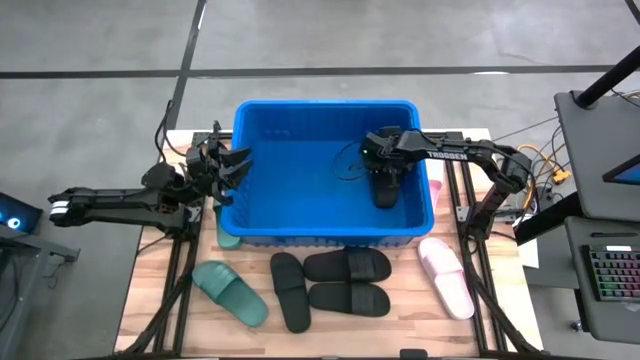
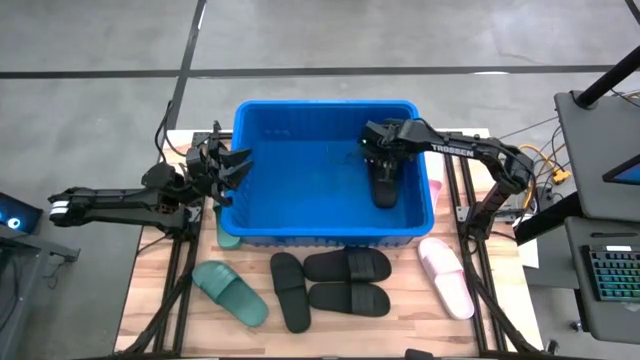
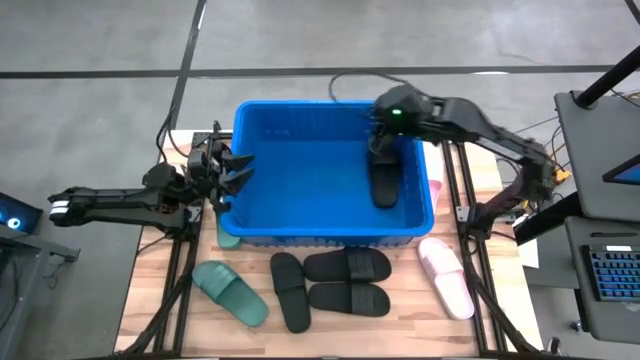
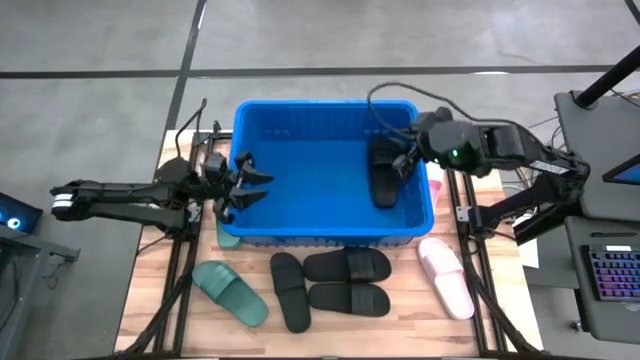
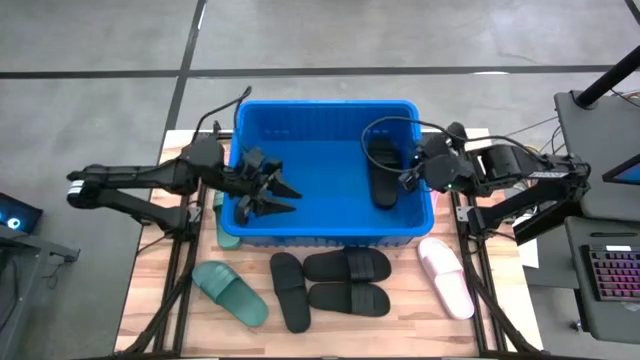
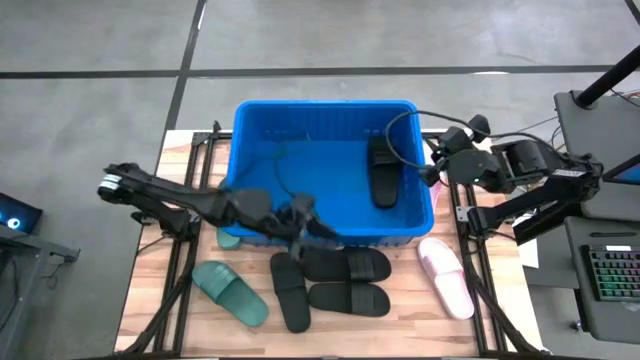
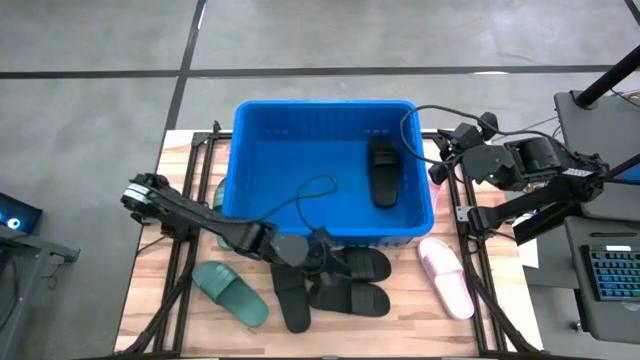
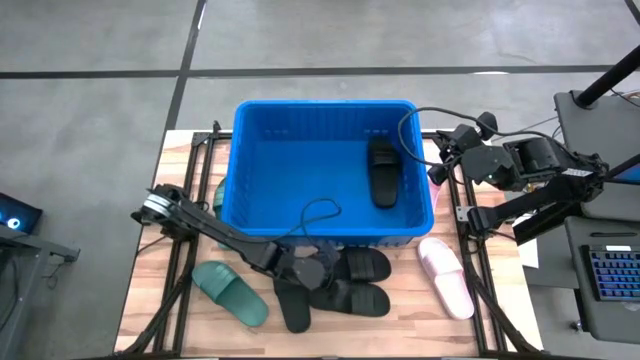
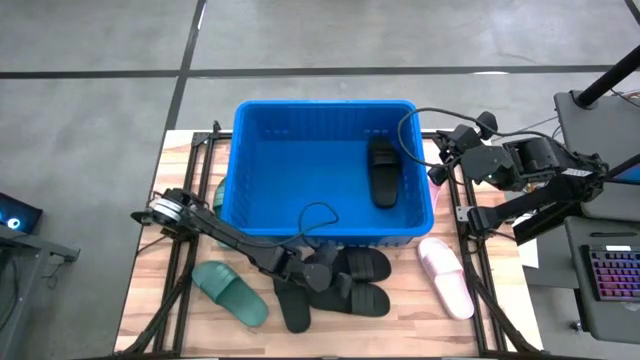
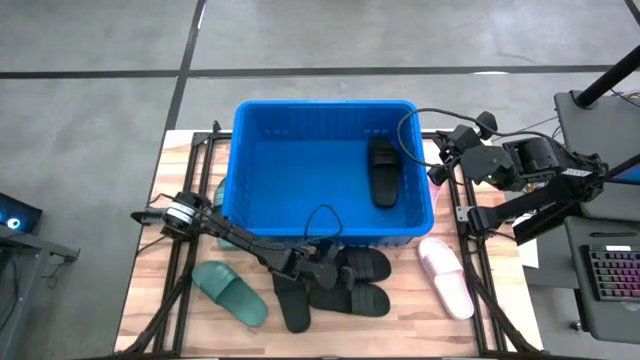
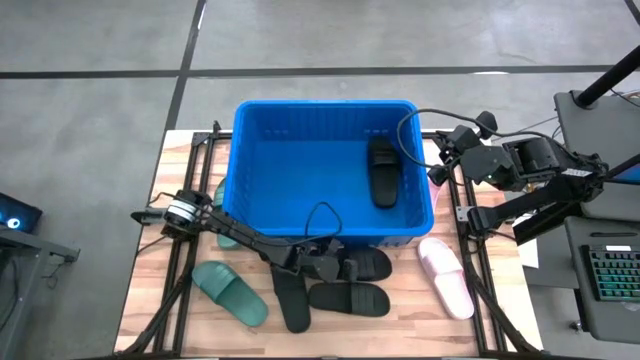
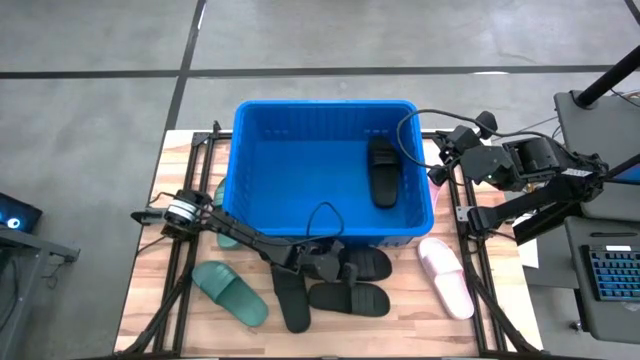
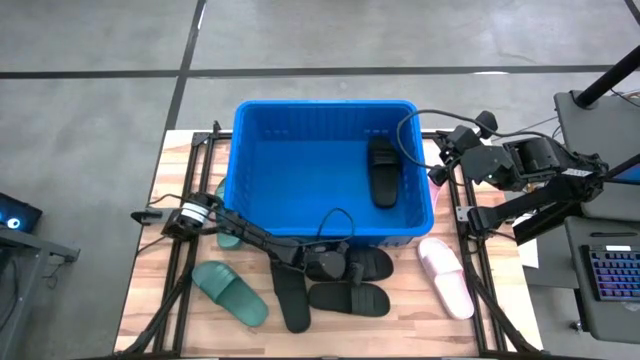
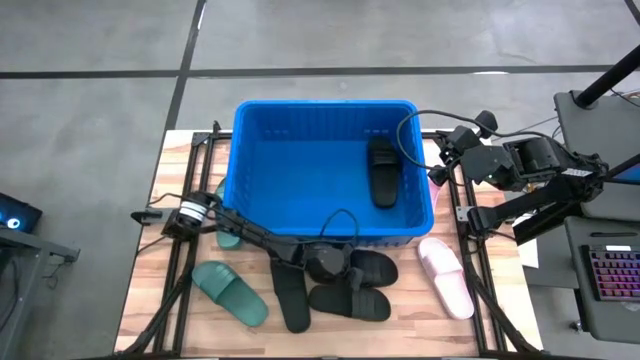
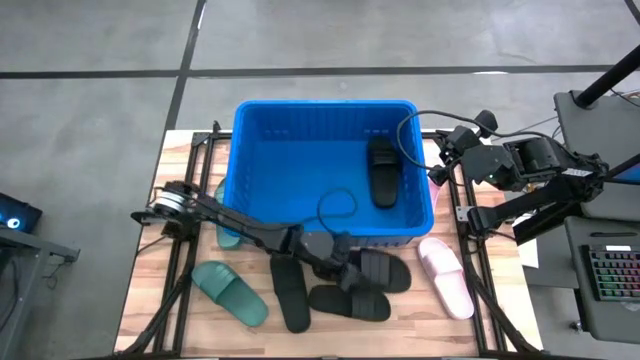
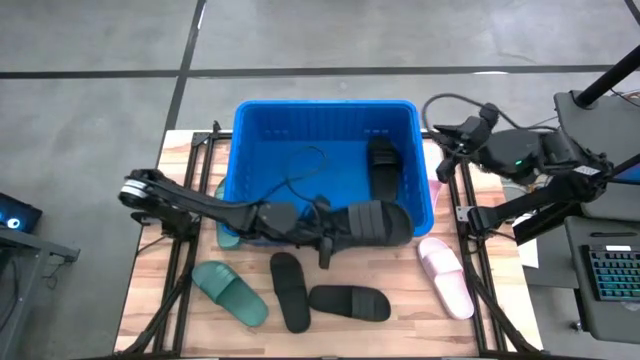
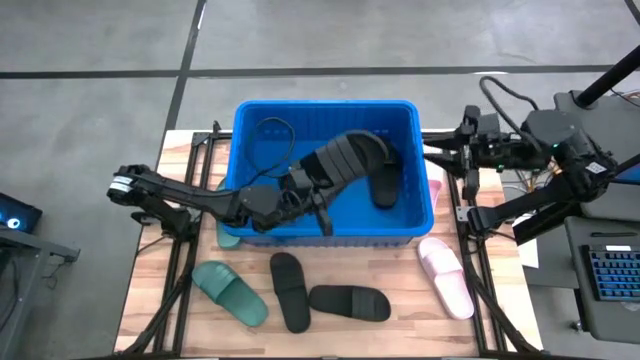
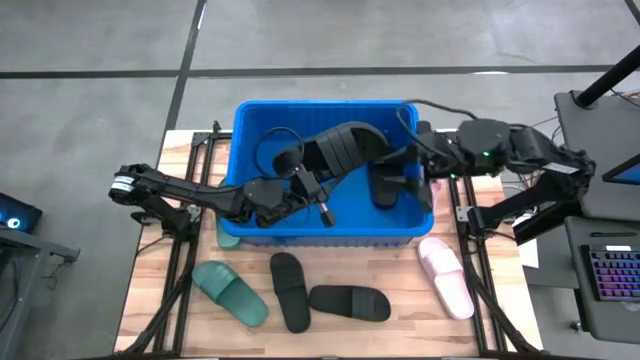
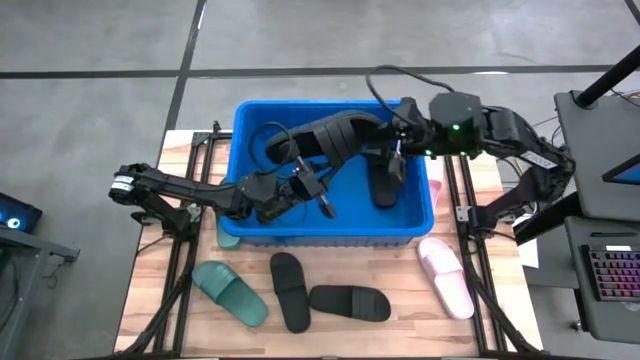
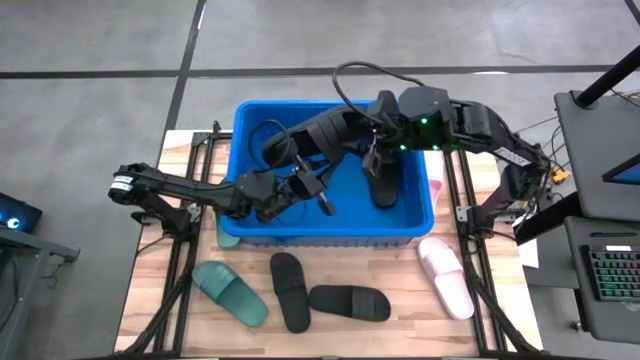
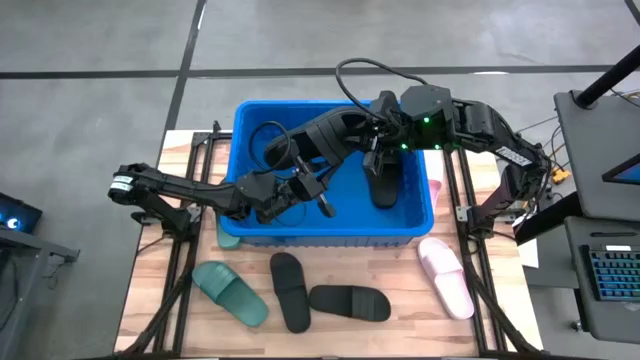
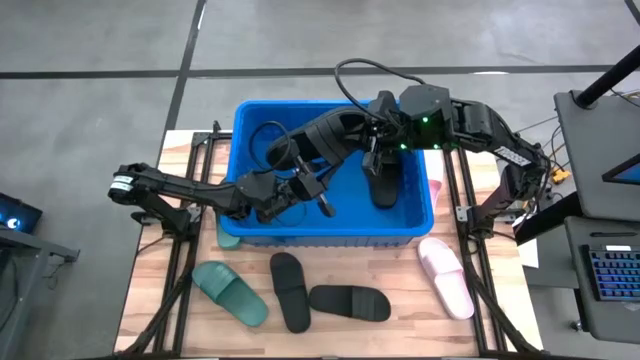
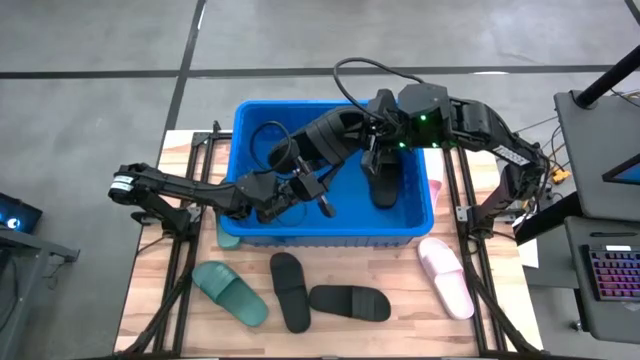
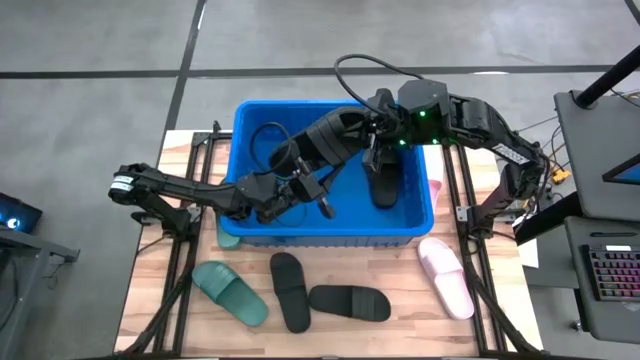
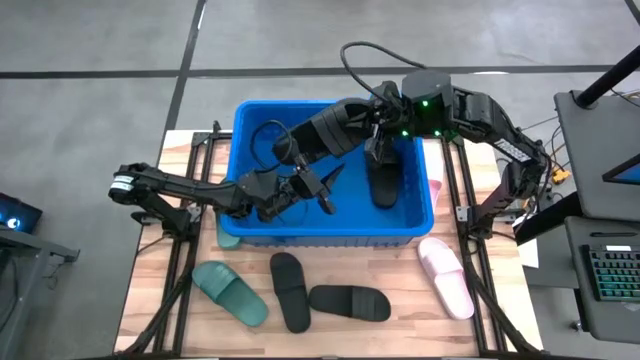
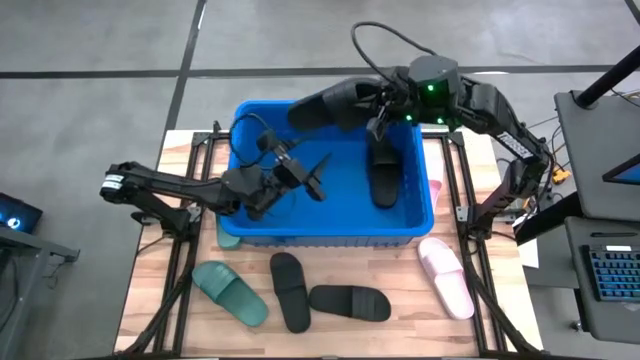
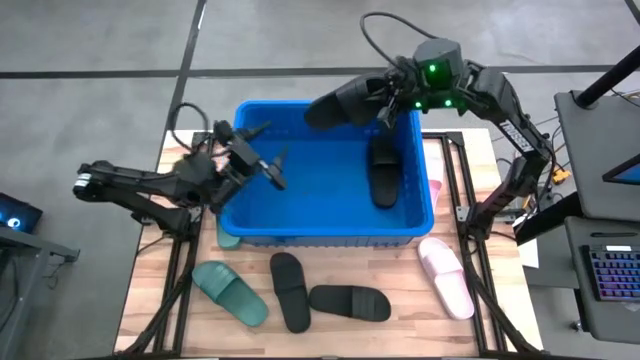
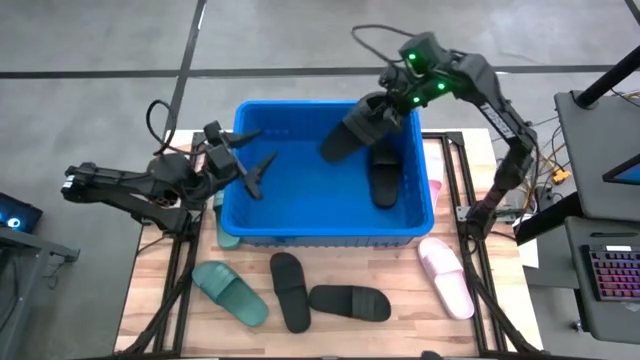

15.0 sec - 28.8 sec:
Task: Pick and place slides into bin
Put the black slide into the blue container

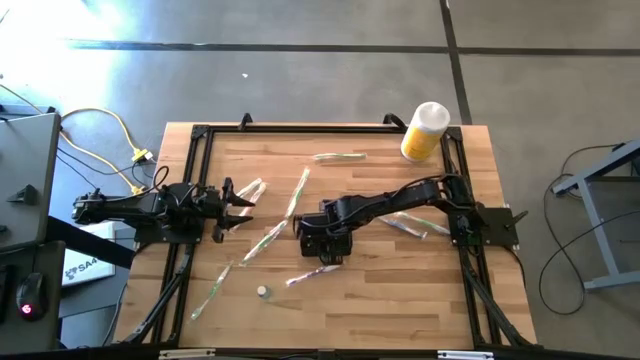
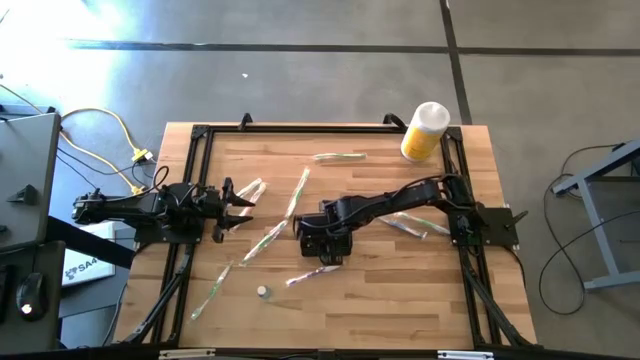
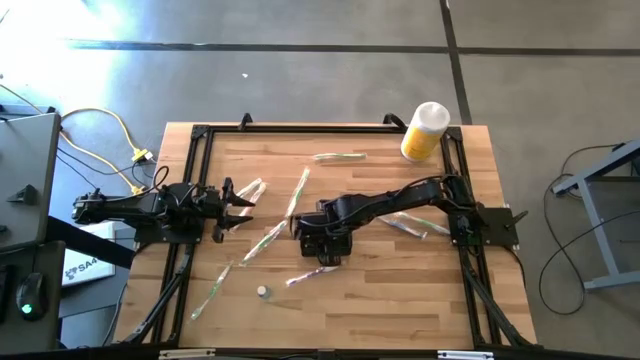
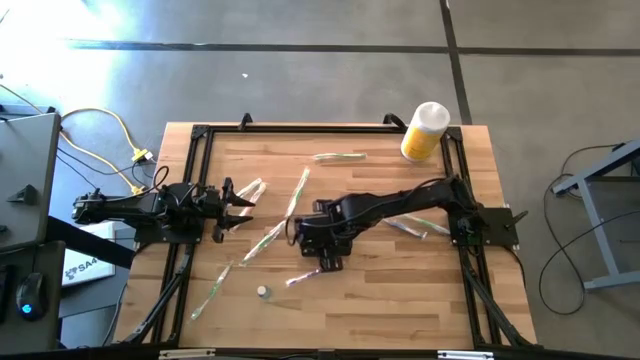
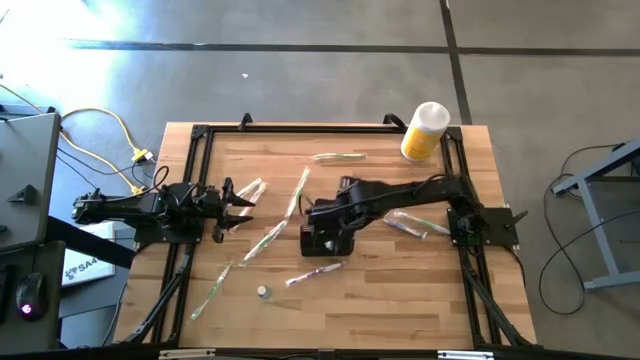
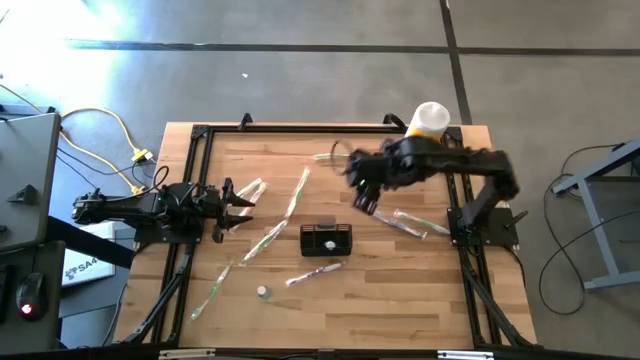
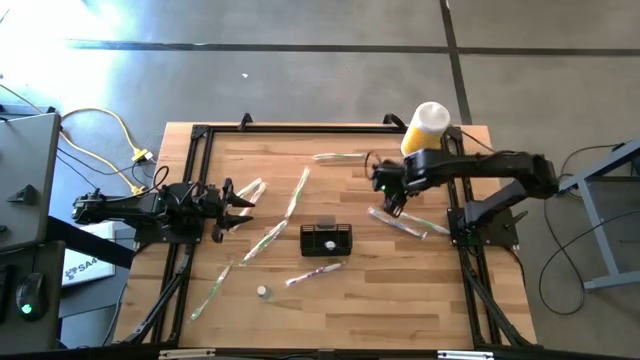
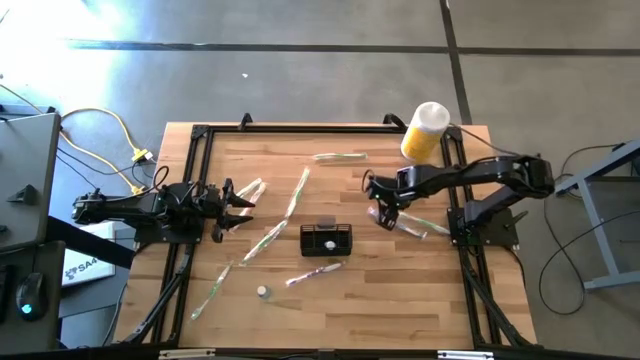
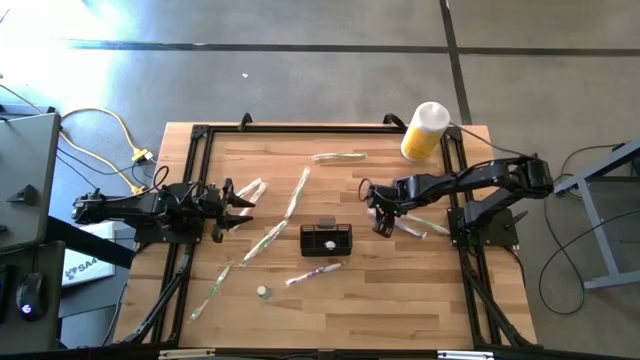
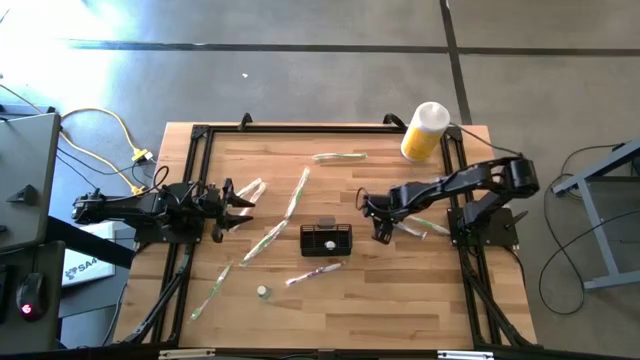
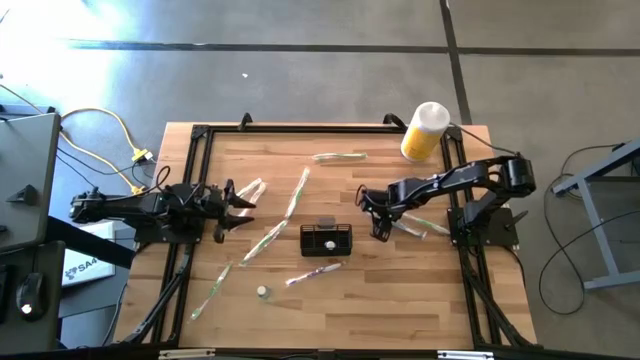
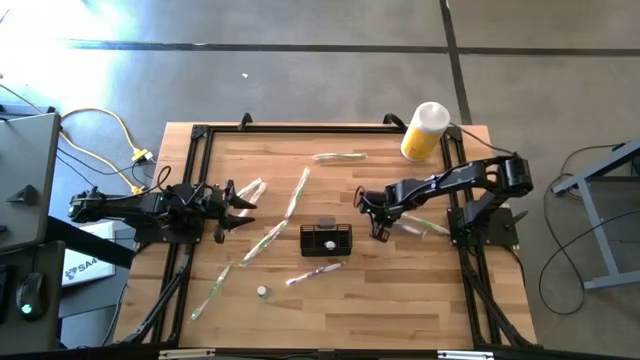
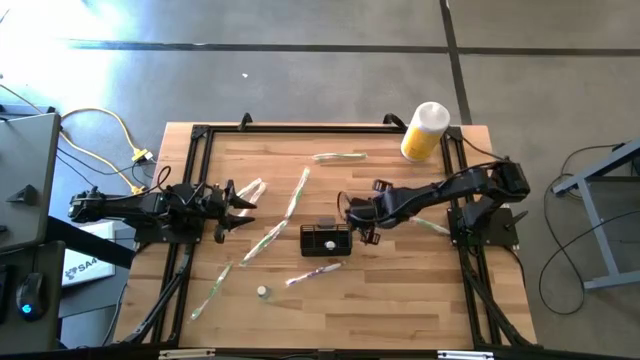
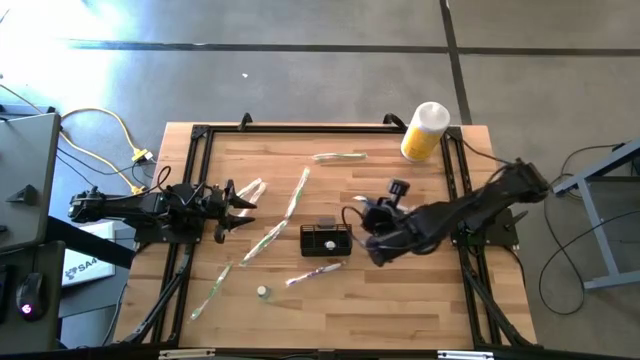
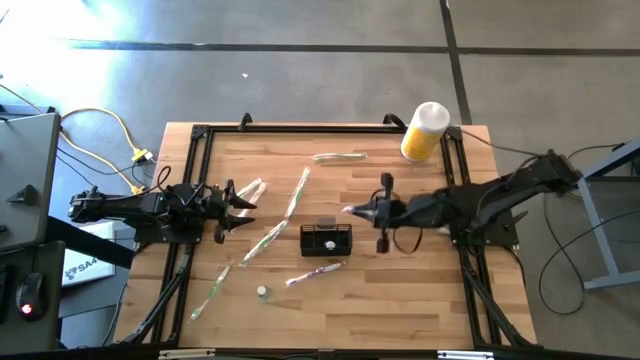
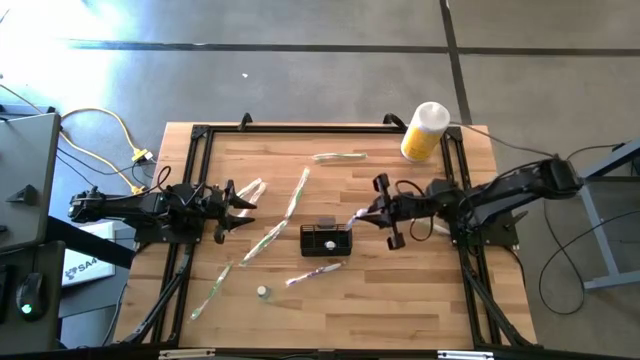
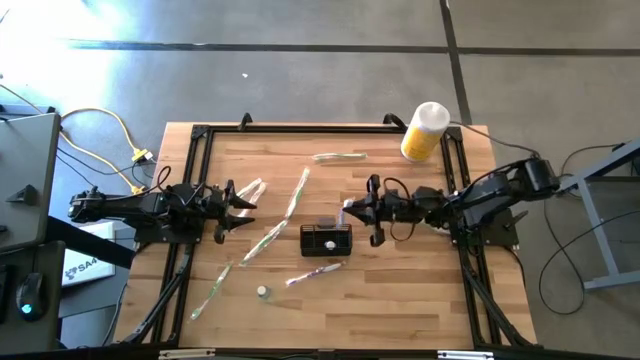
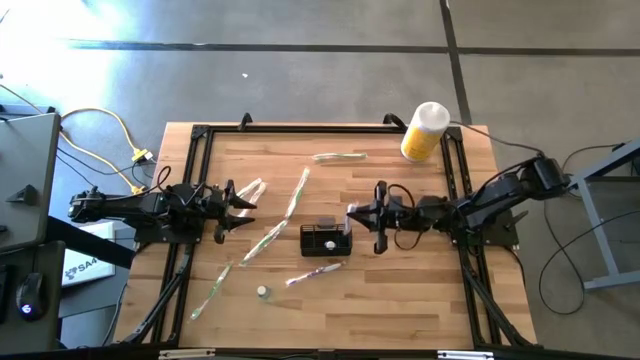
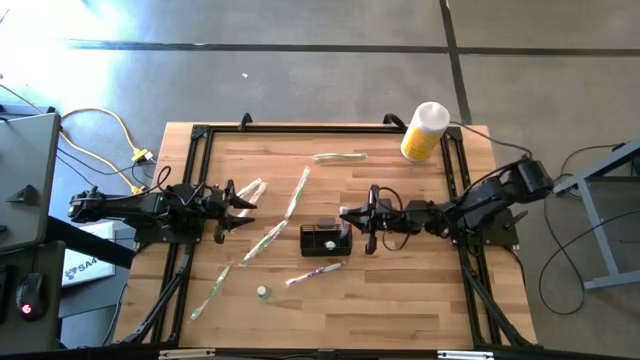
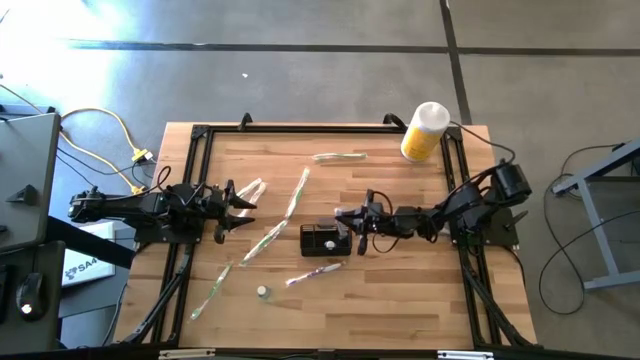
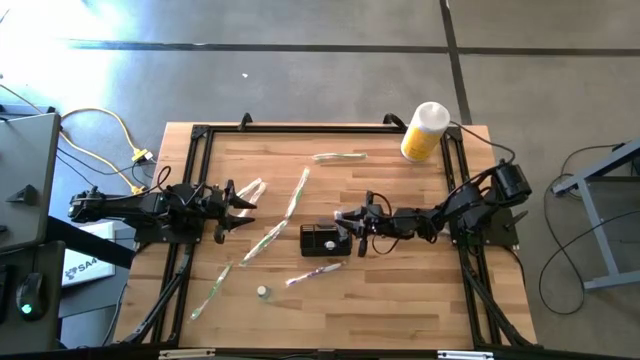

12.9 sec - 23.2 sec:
Task: Pick & Place toothbrushing station
Put the blue toothbrush into the black wire organizer
